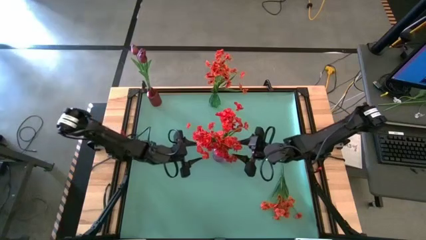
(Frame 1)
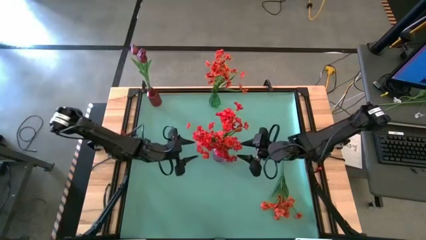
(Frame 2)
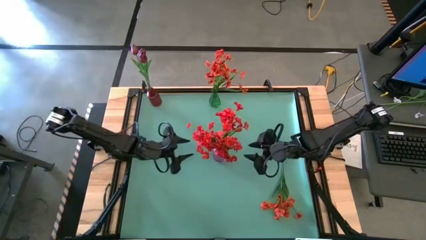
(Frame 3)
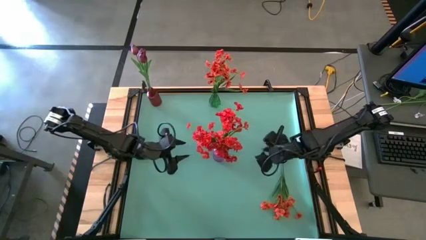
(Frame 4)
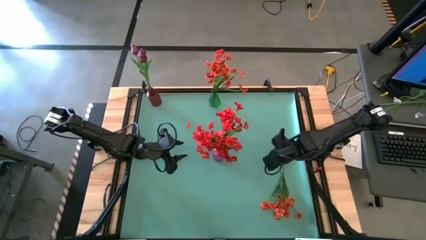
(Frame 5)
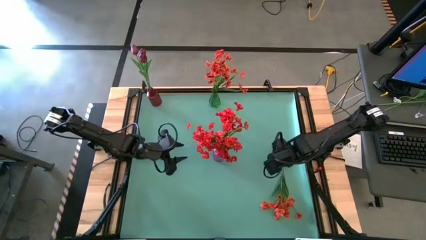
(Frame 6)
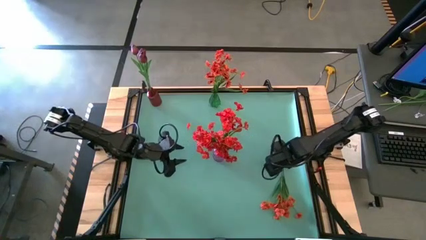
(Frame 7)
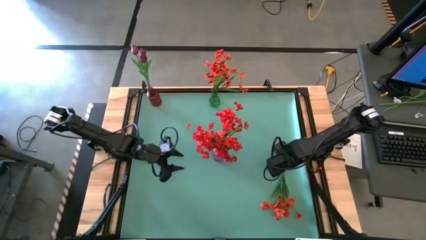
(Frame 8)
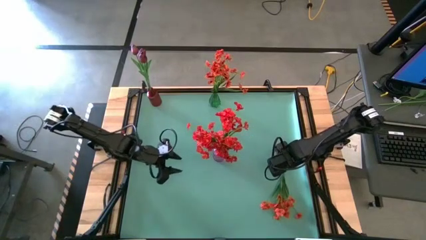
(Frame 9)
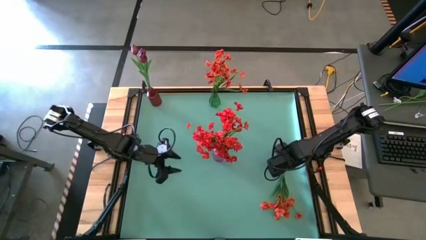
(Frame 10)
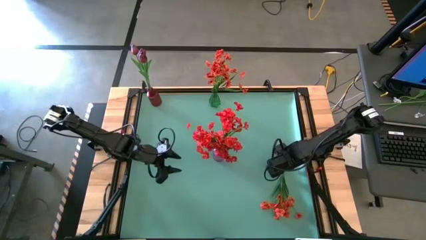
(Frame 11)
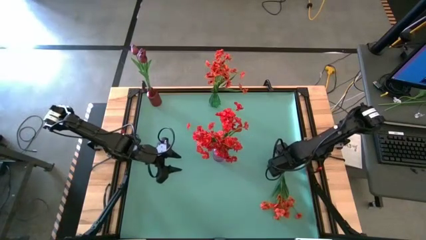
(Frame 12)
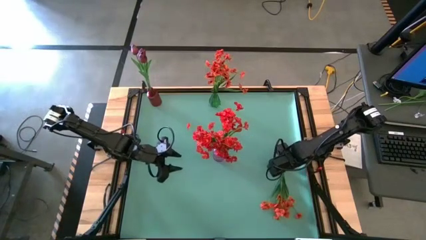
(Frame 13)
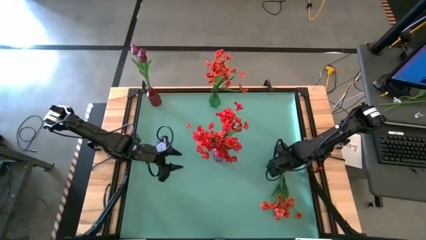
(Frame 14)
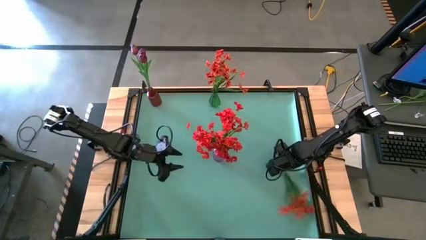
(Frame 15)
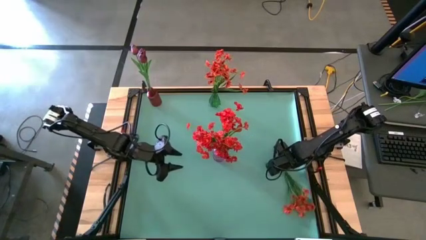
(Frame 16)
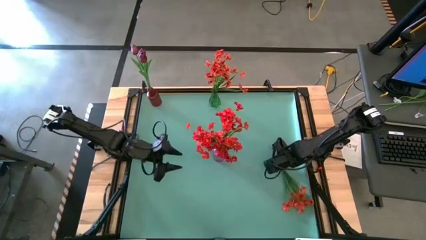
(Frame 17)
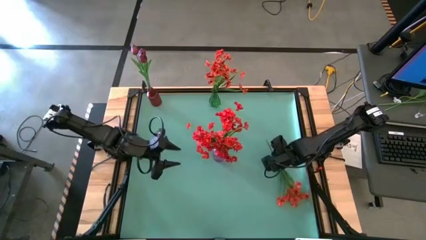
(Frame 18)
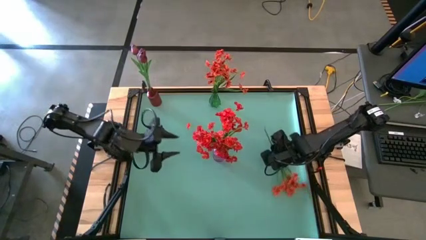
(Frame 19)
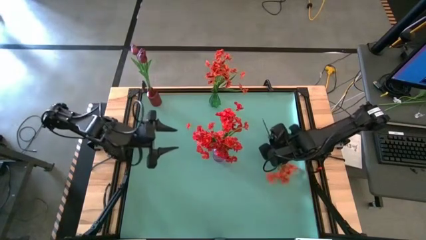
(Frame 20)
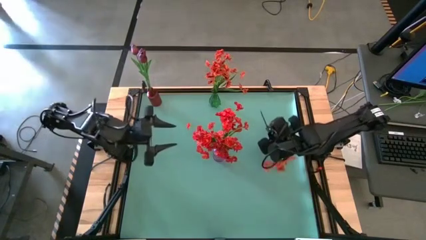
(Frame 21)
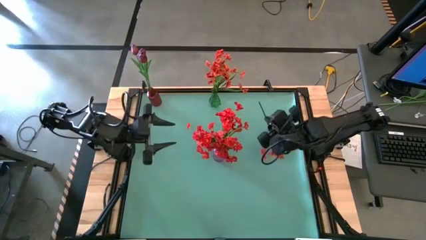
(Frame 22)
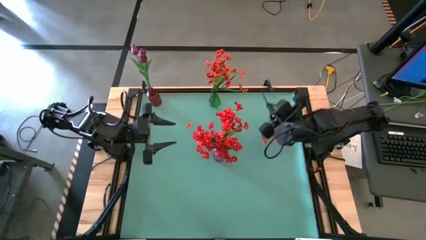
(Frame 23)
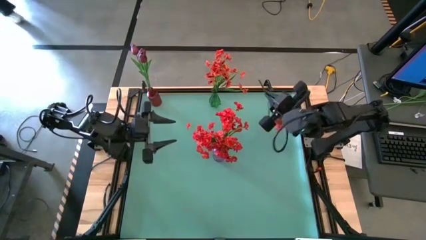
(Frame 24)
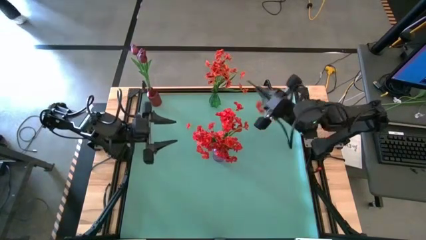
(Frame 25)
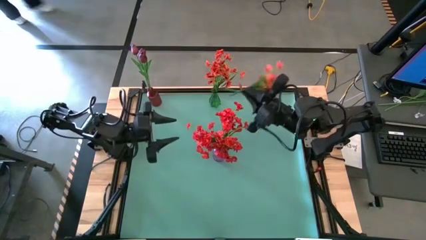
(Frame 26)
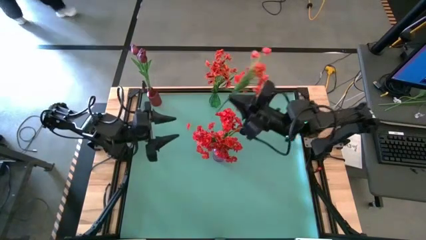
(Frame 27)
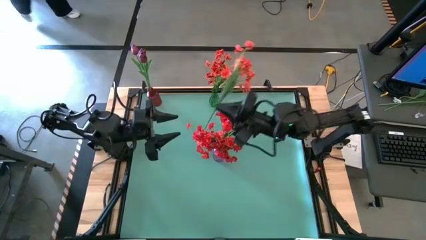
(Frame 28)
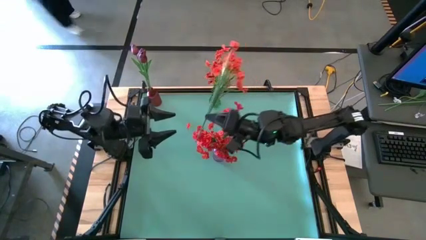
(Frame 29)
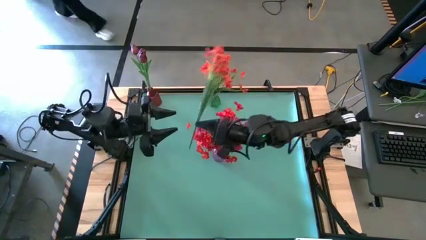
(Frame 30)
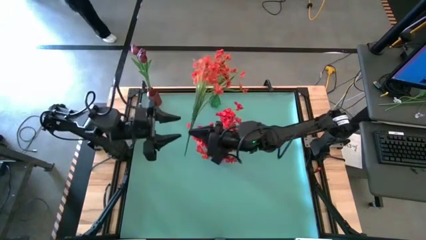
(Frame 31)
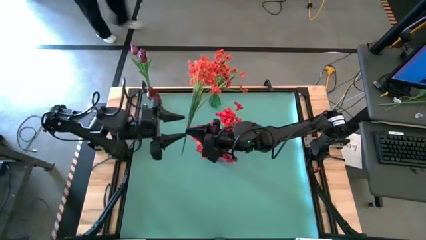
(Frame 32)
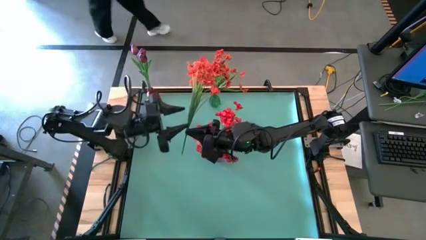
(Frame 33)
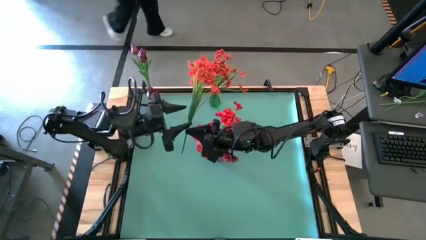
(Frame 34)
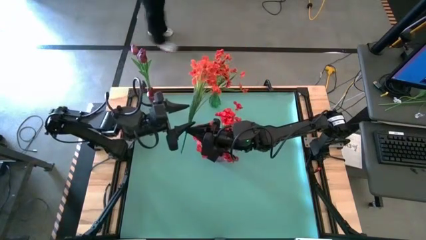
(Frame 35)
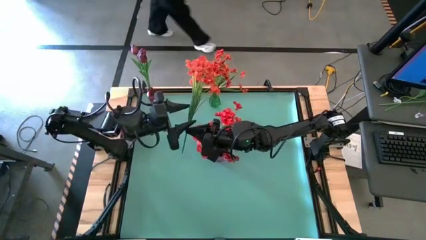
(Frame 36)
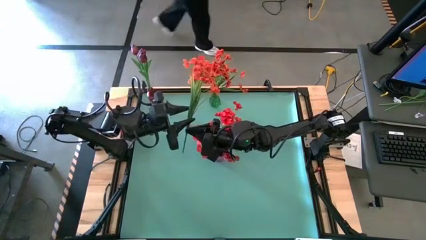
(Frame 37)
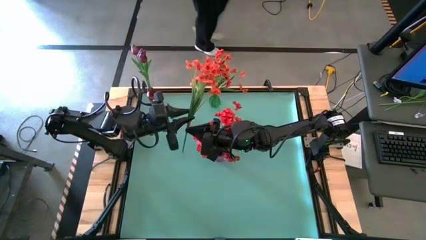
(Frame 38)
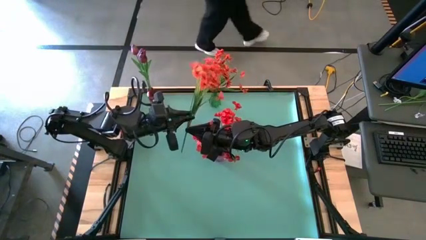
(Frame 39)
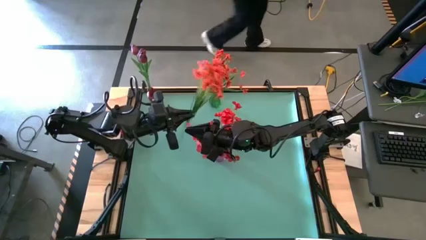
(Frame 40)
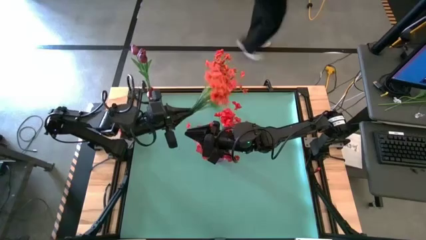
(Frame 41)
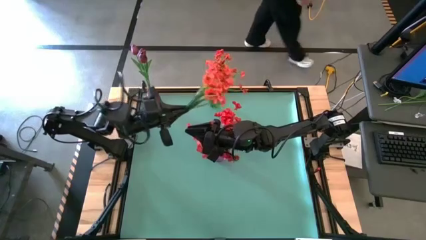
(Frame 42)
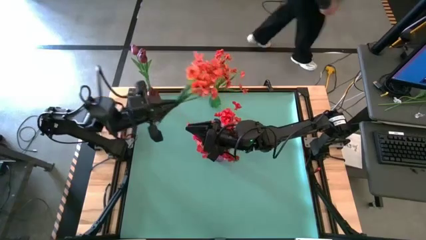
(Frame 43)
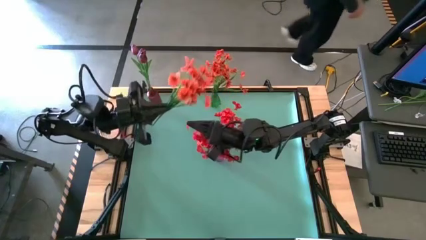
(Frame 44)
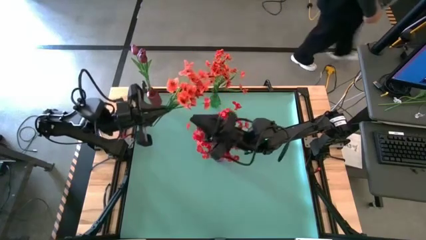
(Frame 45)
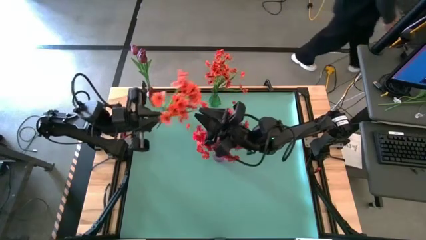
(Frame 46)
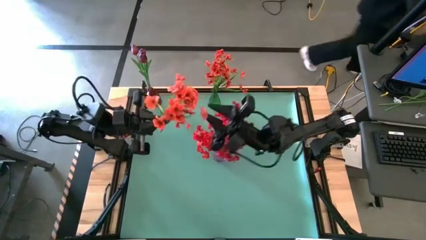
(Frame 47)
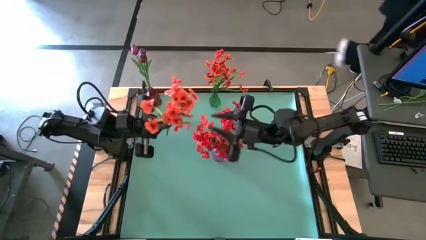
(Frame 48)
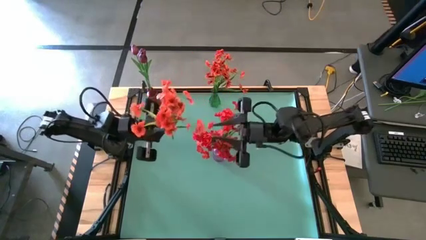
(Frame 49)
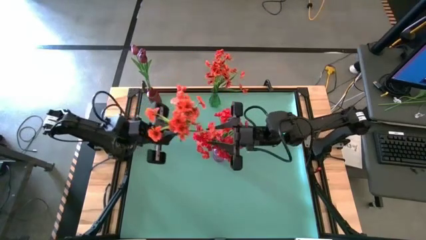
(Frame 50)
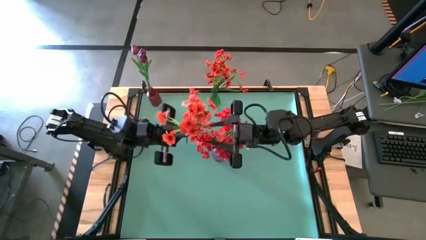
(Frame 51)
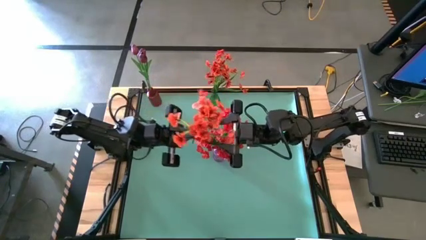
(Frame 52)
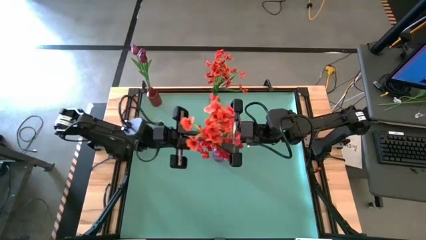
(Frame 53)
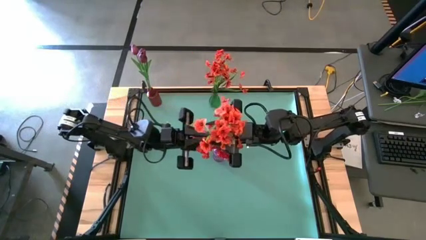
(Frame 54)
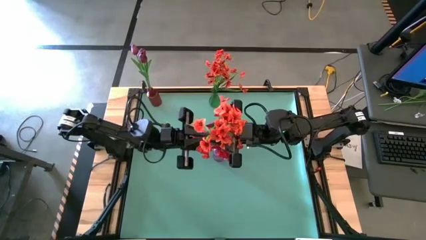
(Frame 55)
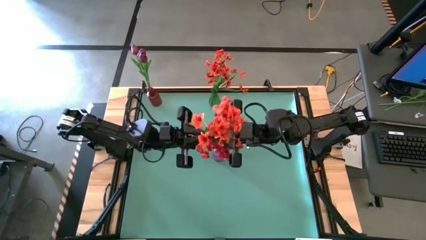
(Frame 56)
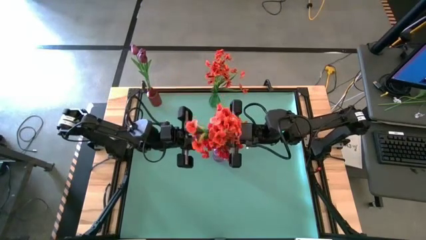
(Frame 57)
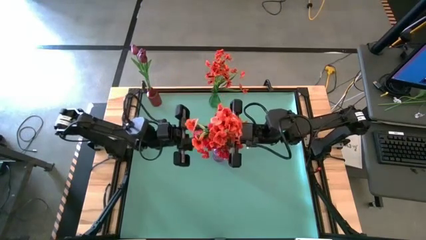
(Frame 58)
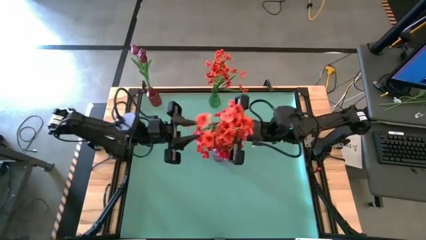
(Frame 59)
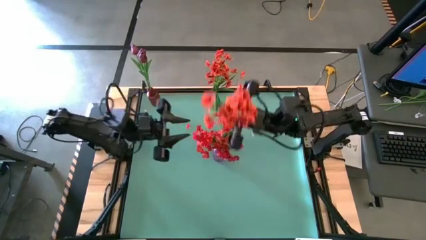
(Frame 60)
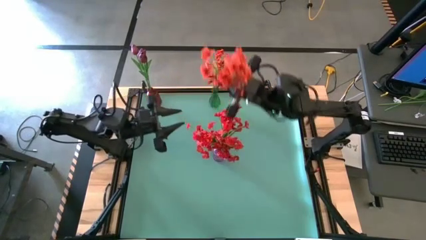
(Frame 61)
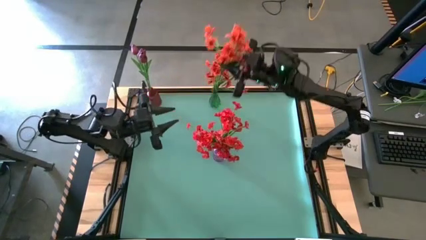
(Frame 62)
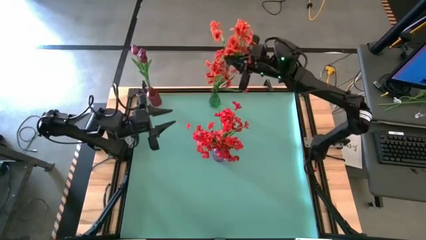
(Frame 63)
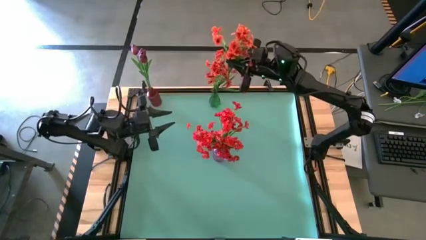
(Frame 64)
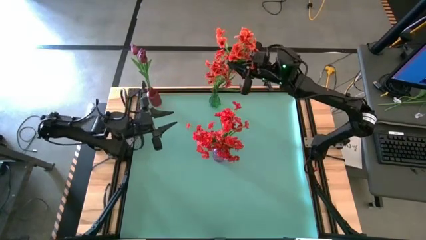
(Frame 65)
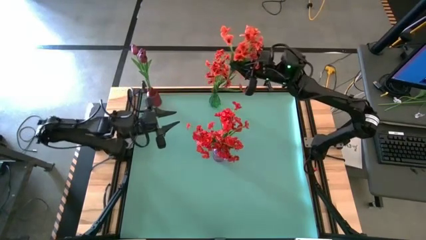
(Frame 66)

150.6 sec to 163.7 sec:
Task: Sort flowers into vase by color
Put the orange flowers into the green vase
